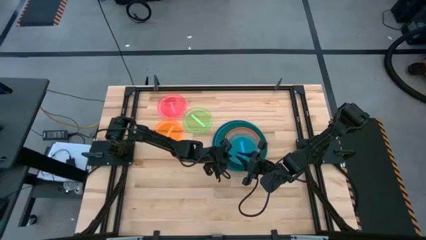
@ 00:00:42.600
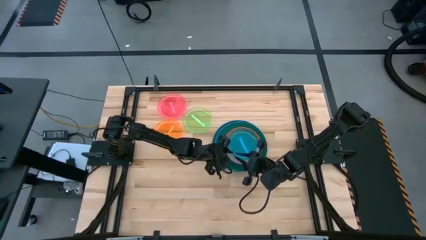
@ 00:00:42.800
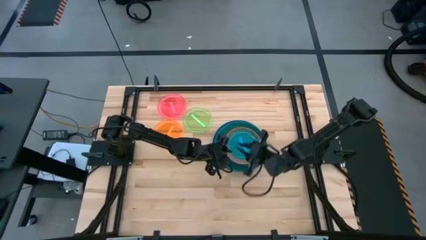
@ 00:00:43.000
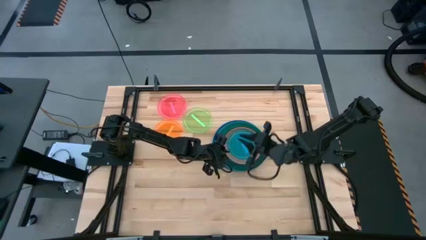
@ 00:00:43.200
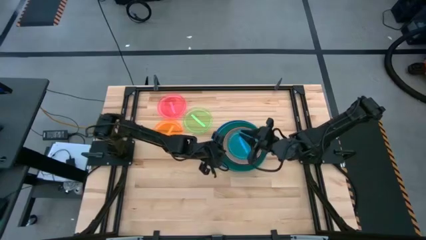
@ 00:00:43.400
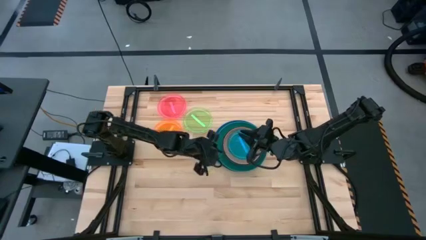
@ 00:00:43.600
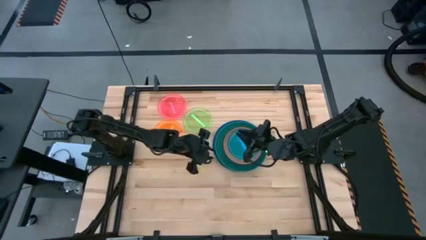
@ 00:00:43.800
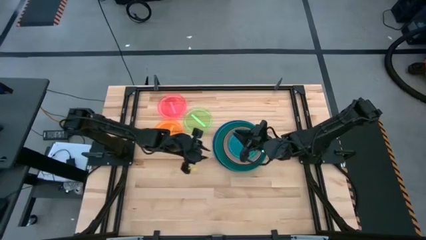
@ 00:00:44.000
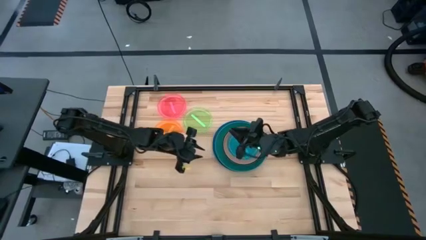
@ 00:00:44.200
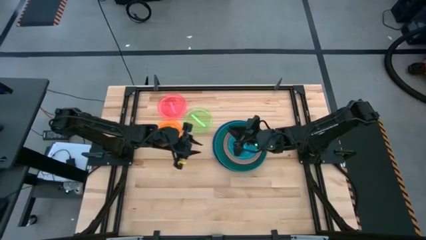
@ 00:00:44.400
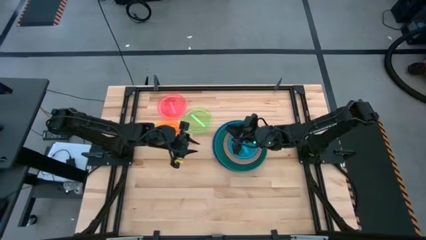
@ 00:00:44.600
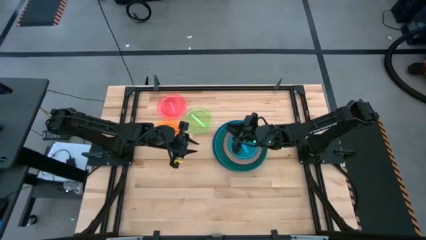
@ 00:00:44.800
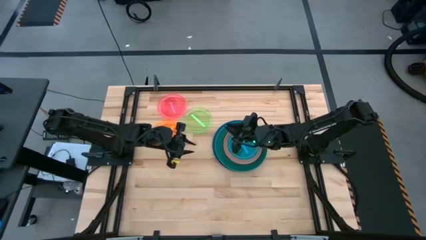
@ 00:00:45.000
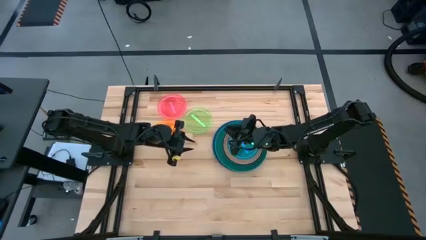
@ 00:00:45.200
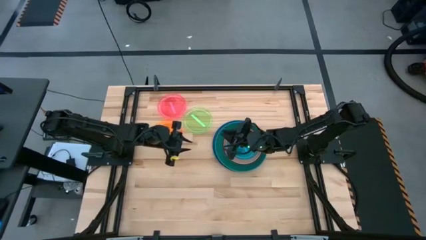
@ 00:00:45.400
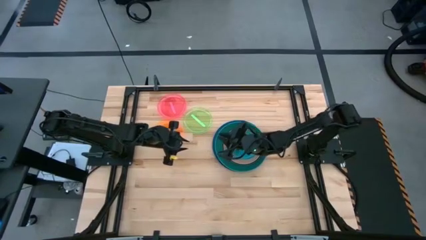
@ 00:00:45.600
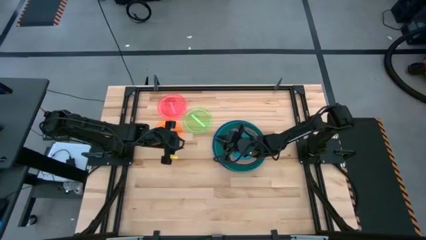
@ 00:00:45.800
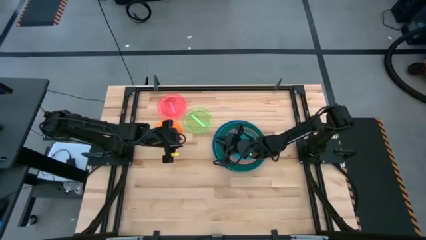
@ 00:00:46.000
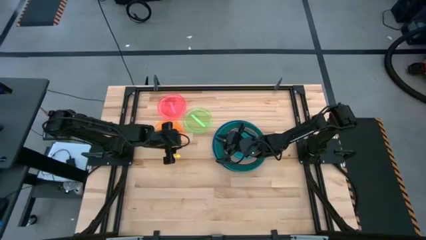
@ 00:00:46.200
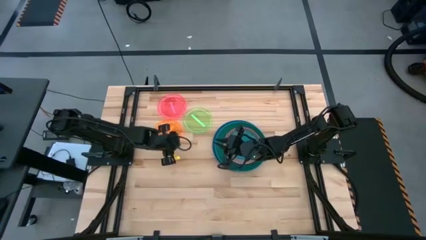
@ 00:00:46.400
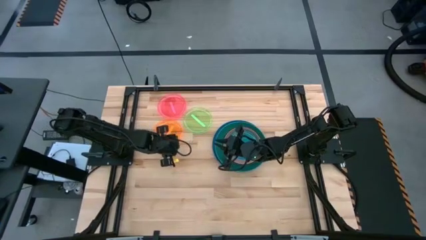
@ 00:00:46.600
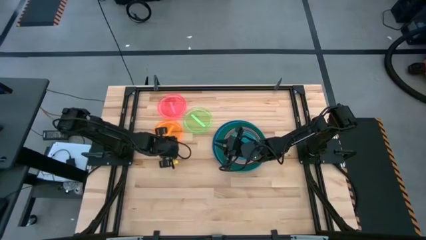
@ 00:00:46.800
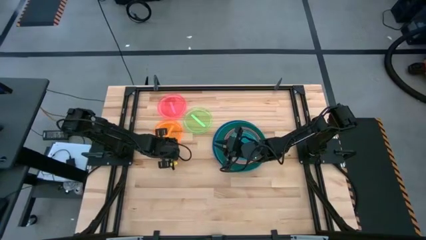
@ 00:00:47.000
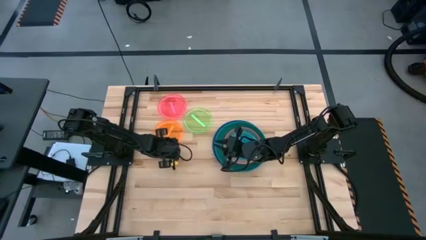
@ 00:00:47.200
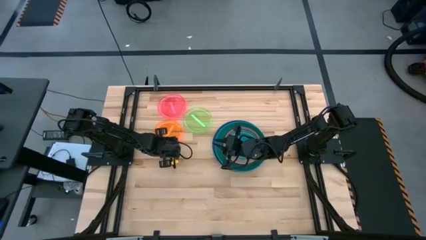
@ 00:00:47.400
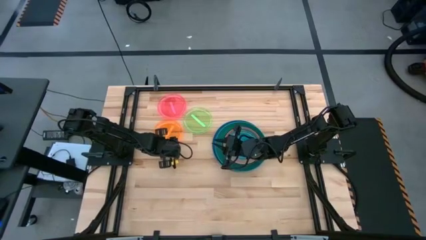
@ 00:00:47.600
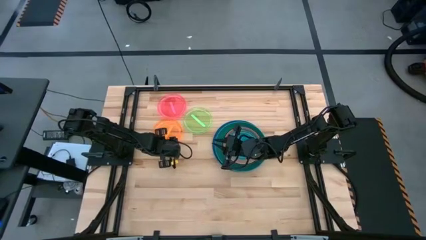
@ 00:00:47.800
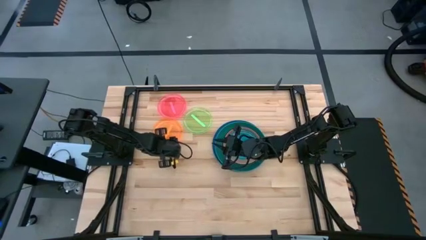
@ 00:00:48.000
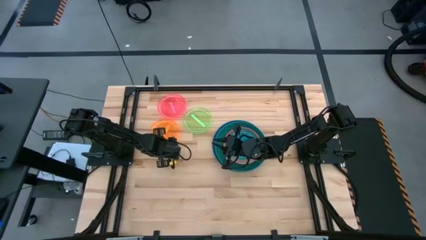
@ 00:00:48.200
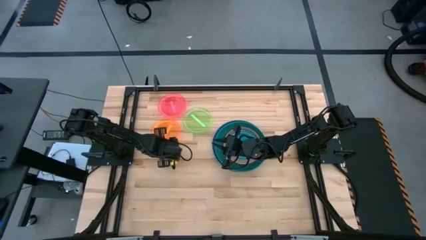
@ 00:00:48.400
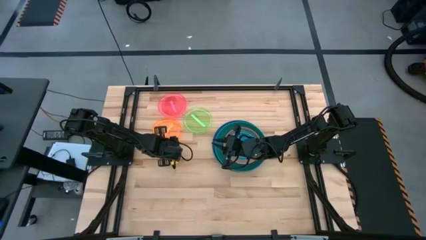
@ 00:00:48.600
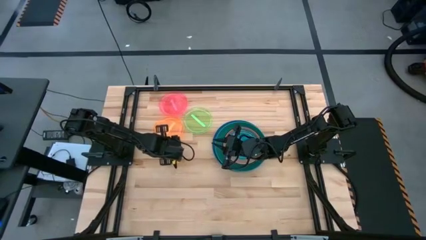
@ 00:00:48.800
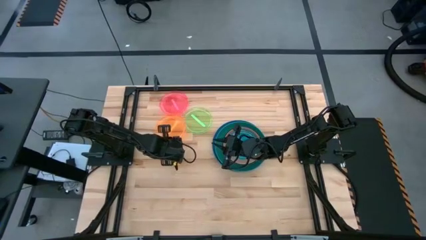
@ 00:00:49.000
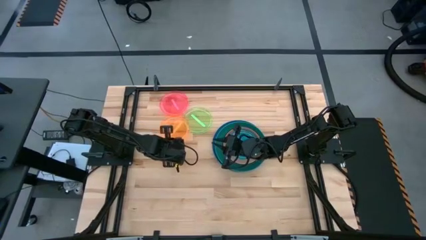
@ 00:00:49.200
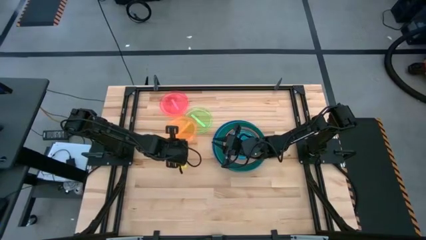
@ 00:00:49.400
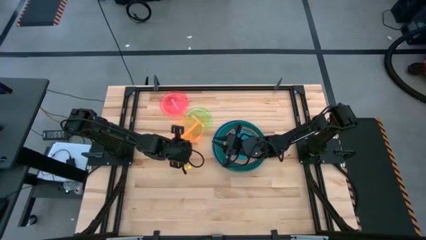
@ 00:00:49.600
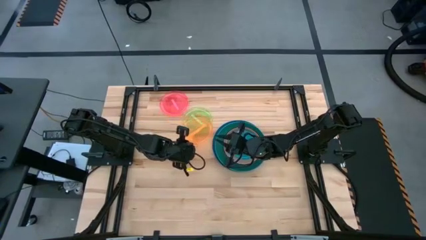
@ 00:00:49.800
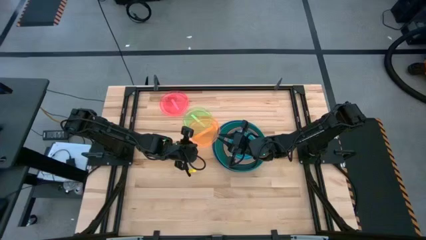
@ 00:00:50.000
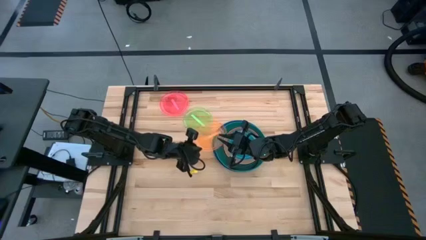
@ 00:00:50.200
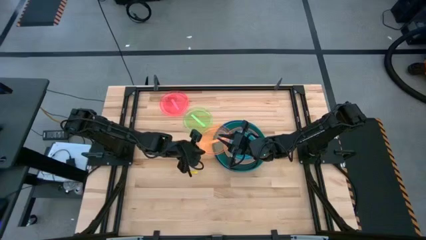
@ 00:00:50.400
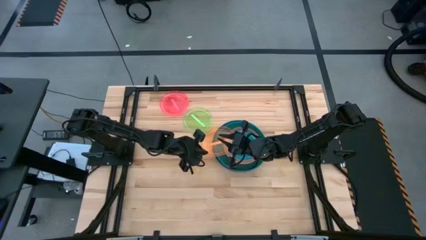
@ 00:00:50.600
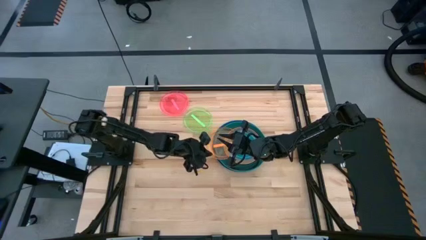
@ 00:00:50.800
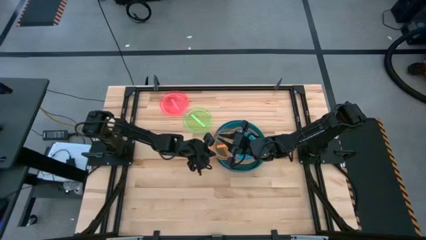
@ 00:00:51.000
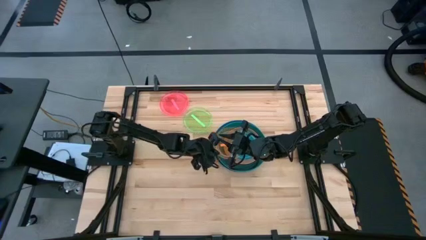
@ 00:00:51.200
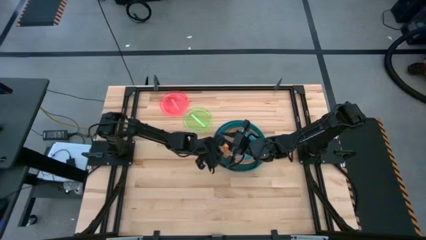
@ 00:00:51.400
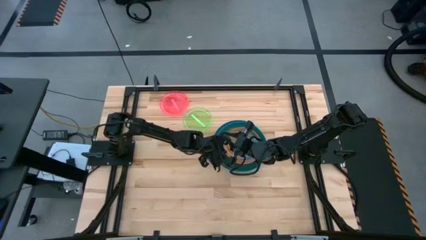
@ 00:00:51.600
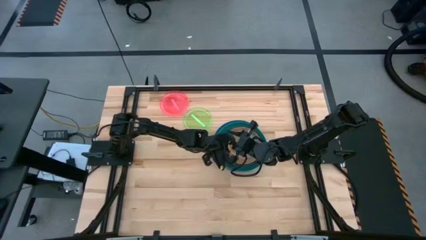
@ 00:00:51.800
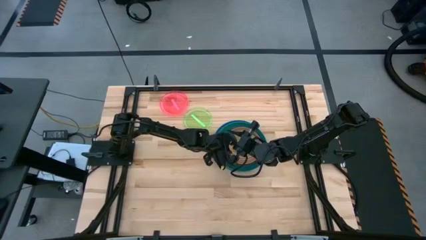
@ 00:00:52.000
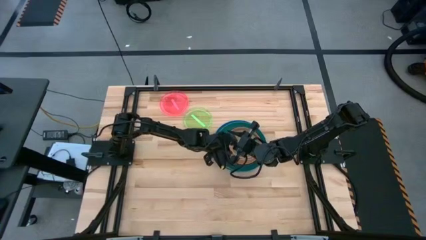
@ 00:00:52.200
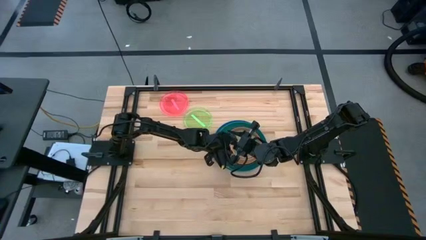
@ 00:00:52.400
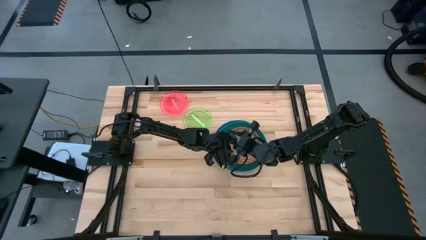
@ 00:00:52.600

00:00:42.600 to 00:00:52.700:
Task: Stack plastic plates
Stack the orange plate on top of the light blue plate

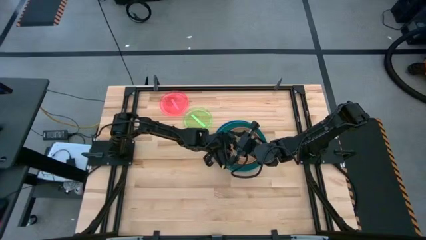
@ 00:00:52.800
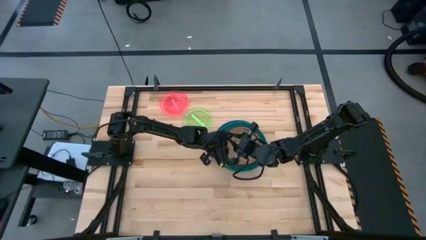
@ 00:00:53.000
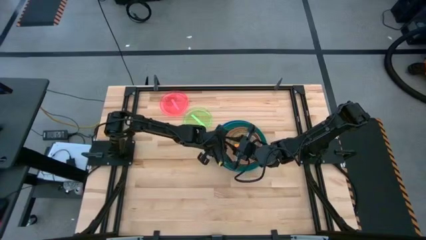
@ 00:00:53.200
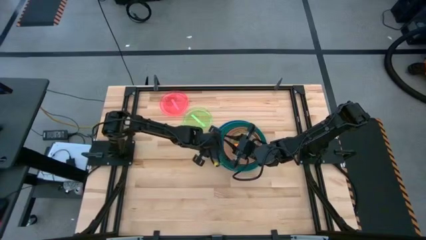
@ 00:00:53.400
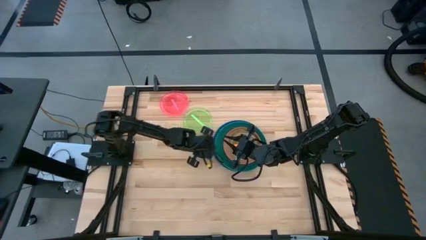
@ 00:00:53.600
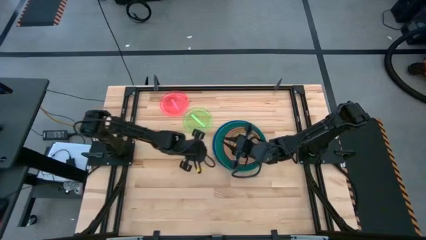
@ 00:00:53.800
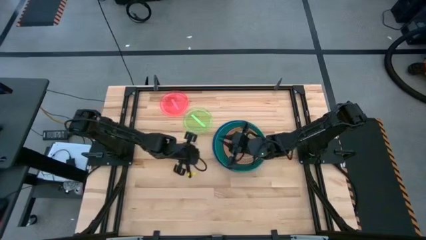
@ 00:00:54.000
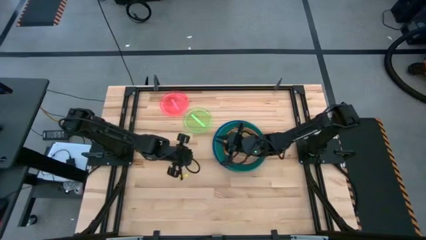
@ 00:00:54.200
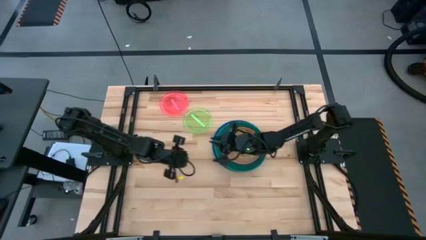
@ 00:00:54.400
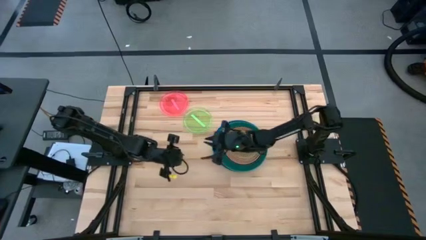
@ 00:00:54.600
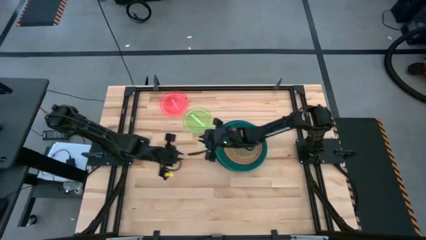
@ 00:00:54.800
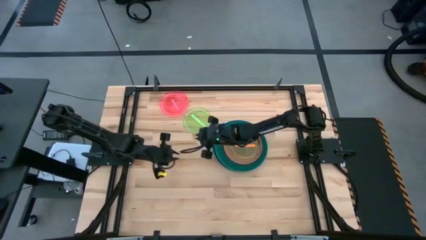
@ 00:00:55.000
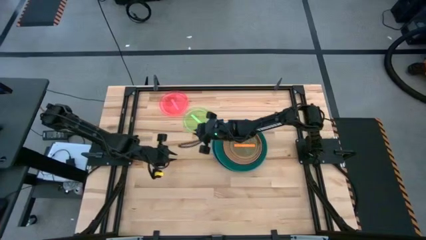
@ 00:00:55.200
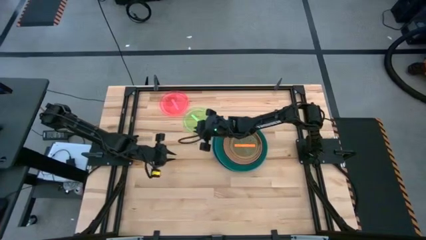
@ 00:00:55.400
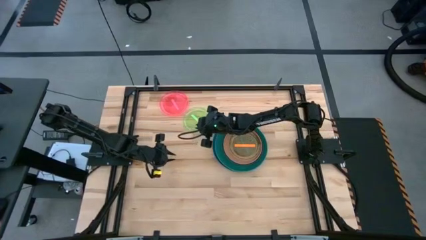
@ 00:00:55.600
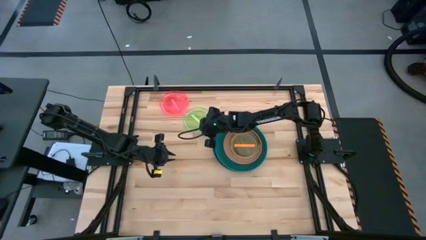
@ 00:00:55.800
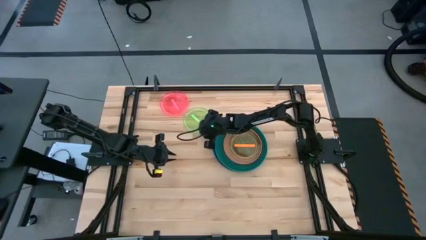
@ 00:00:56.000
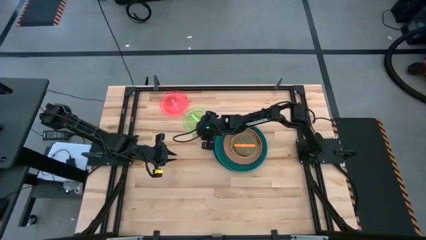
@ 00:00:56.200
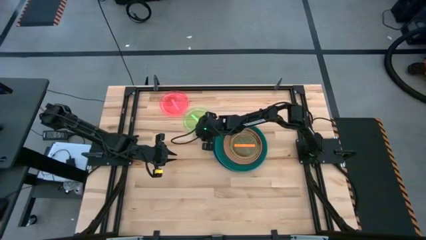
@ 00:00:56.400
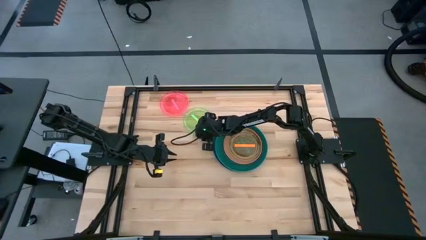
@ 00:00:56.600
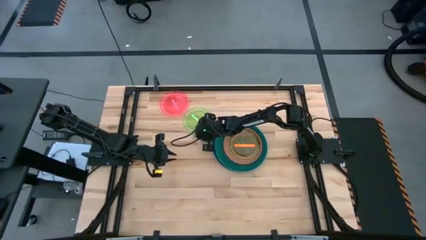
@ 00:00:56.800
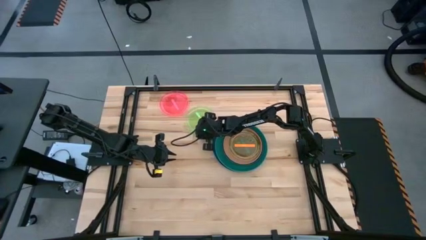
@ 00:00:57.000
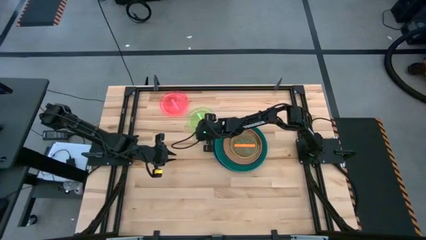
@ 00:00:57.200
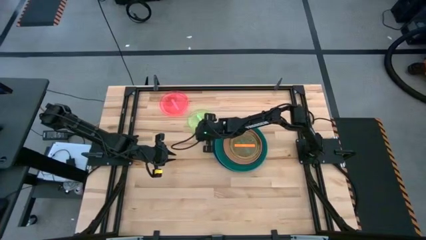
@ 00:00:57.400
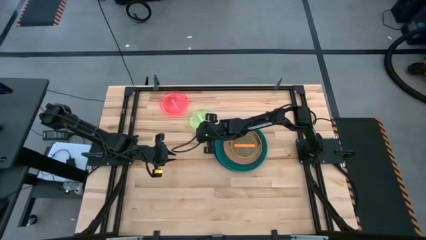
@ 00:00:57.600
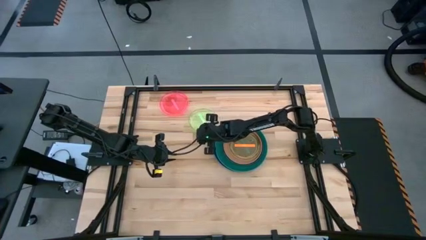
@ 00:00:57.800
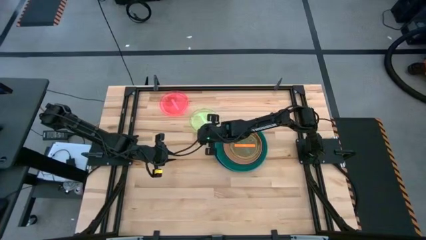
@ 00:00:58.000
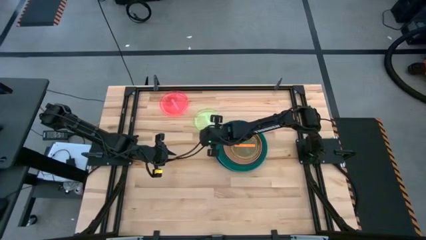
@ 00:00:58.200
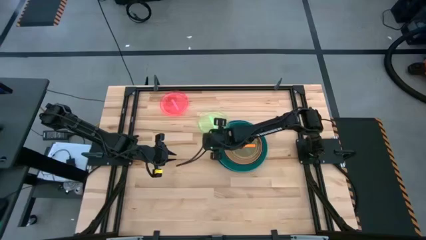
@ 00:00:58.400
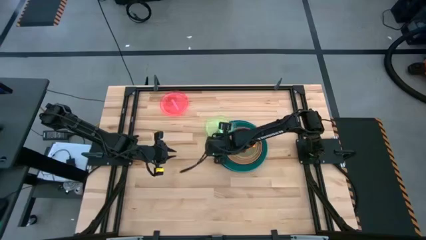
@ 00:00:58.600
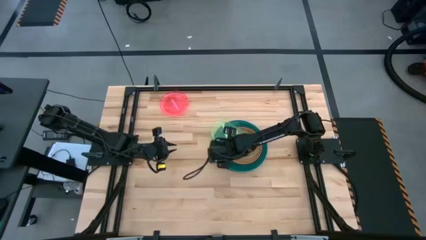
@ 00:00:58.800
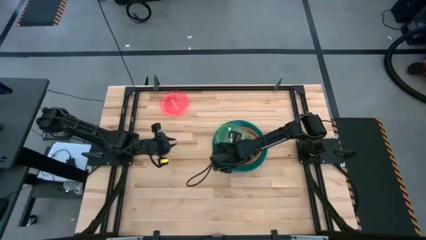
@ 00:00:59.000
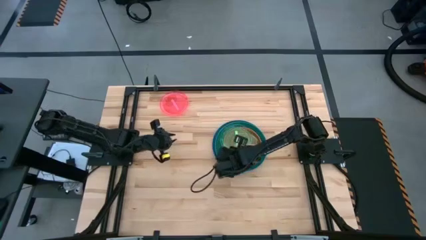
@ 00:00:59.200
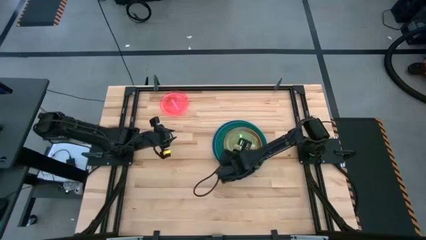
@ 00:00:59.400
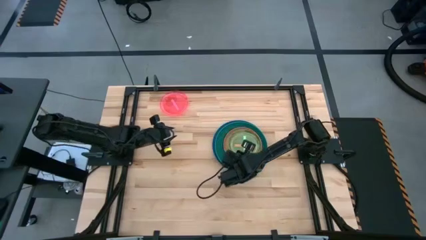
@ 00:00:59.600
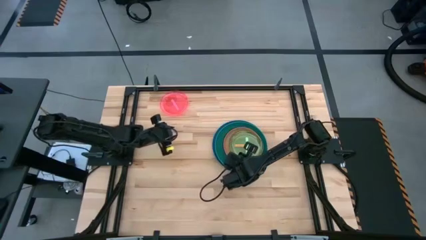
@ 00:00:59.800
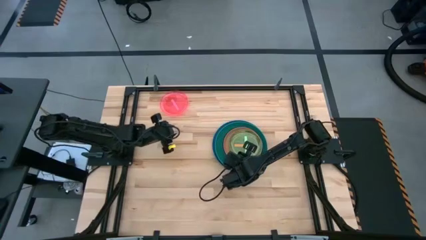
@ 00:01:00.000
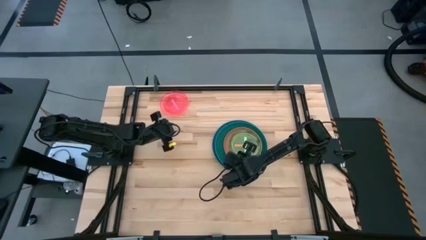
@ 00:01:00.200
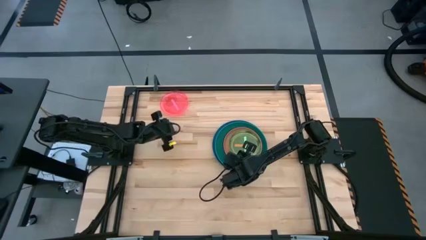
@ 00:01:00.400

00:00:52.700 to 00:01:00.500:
Stack the green plate on top of the orange plate
